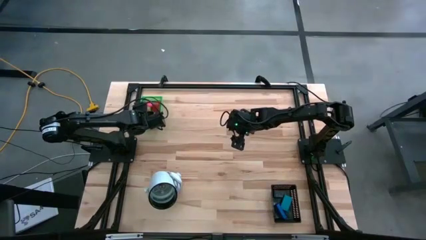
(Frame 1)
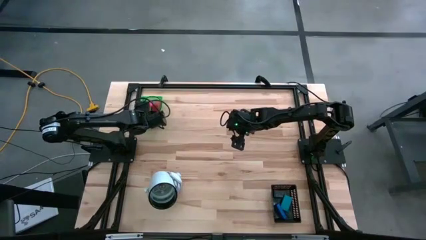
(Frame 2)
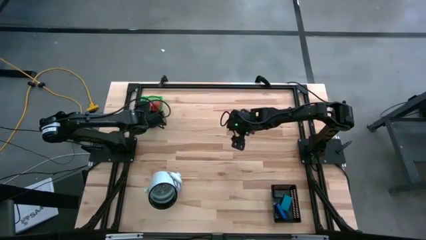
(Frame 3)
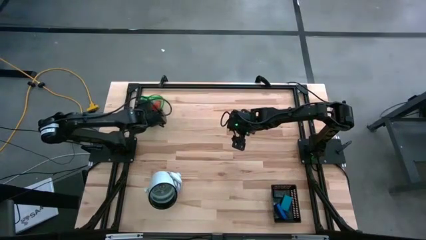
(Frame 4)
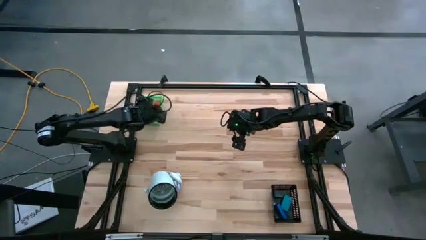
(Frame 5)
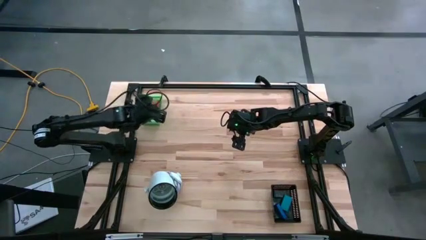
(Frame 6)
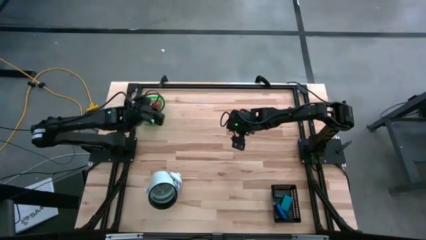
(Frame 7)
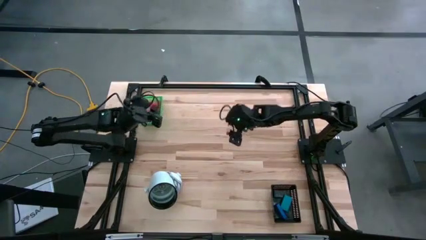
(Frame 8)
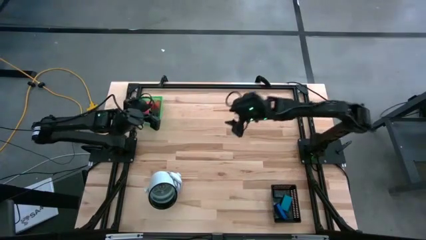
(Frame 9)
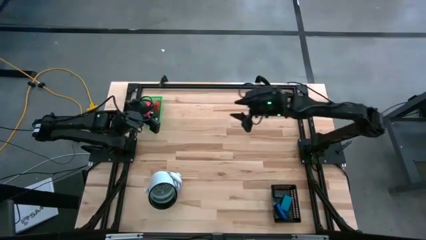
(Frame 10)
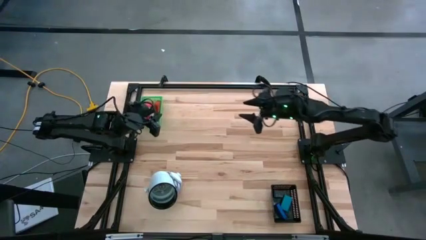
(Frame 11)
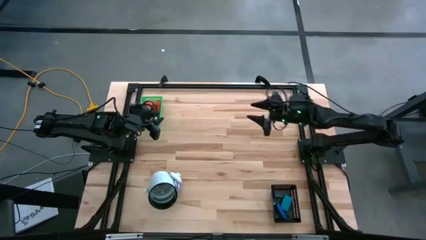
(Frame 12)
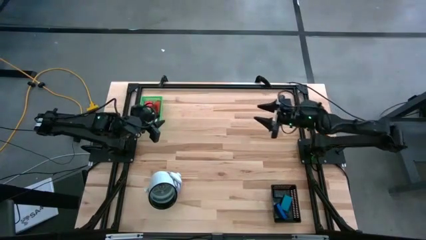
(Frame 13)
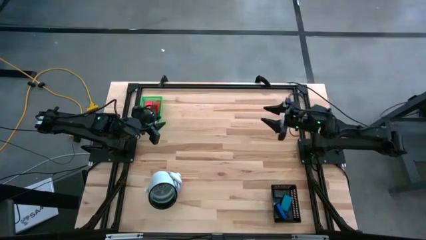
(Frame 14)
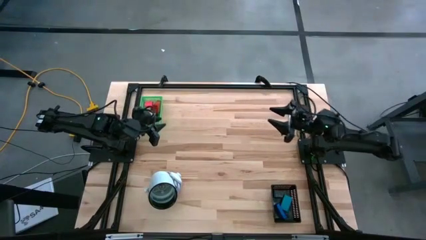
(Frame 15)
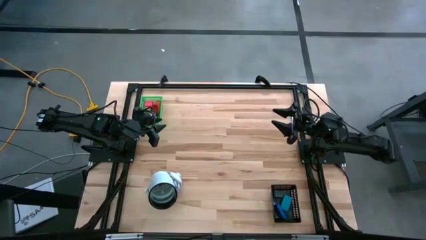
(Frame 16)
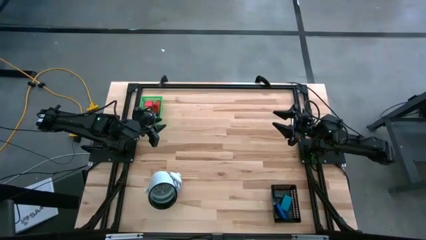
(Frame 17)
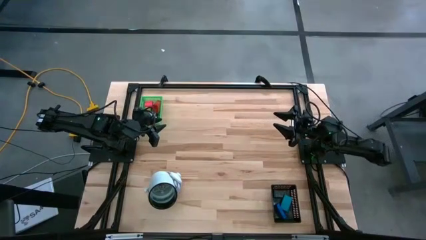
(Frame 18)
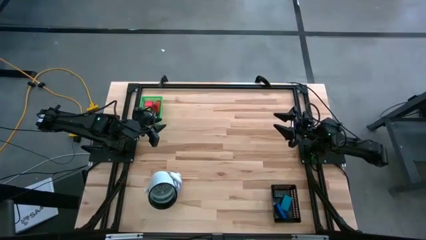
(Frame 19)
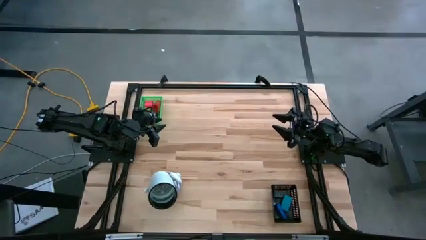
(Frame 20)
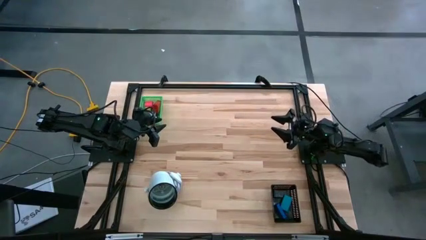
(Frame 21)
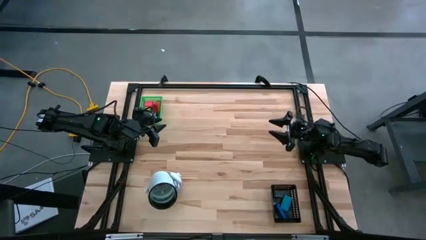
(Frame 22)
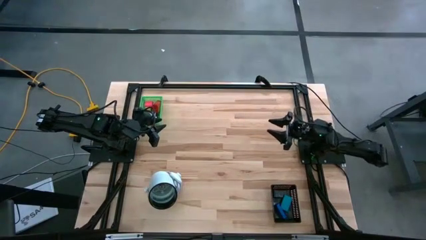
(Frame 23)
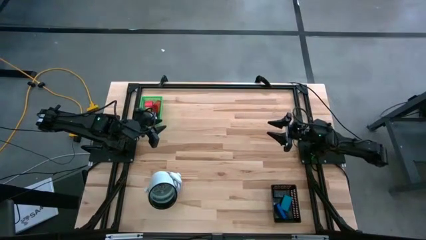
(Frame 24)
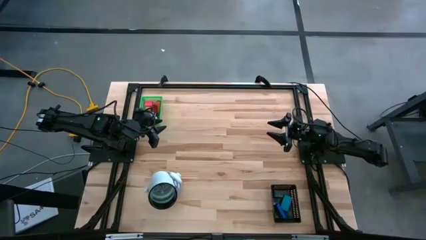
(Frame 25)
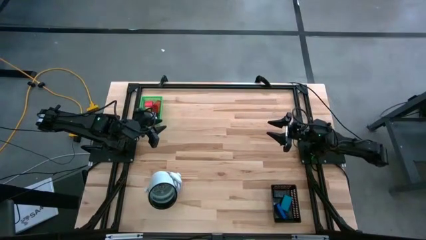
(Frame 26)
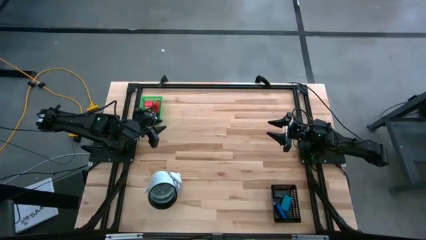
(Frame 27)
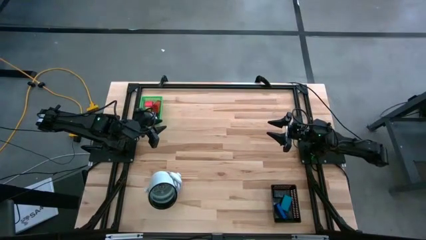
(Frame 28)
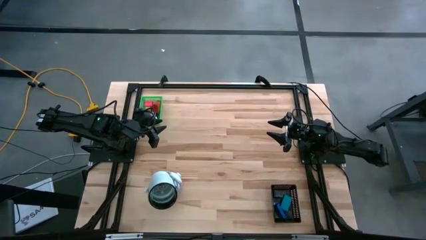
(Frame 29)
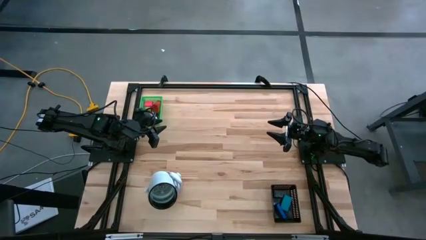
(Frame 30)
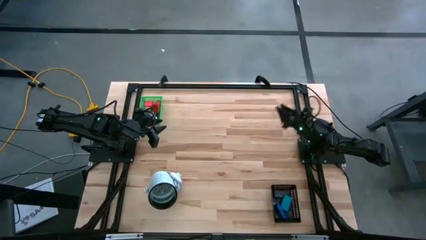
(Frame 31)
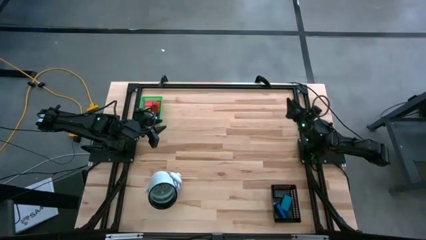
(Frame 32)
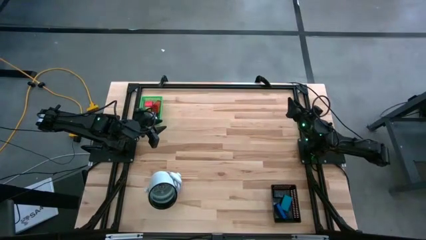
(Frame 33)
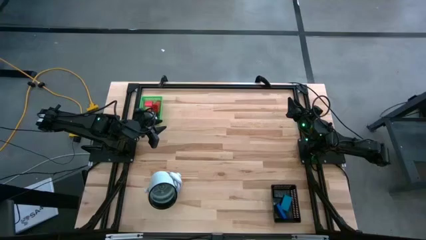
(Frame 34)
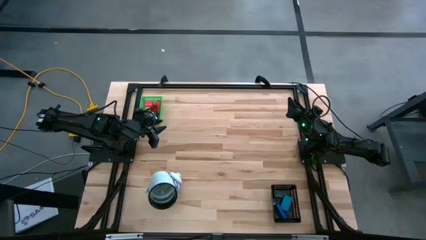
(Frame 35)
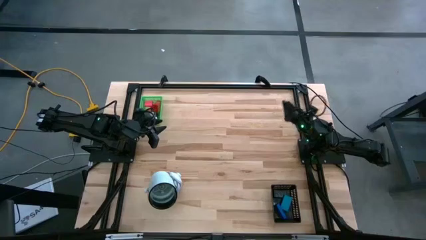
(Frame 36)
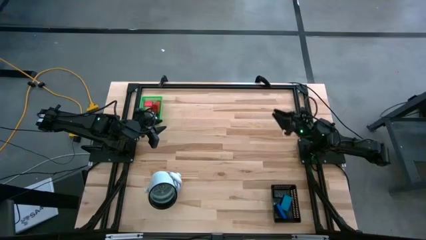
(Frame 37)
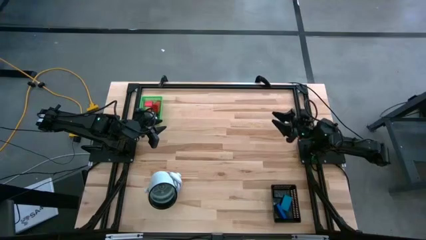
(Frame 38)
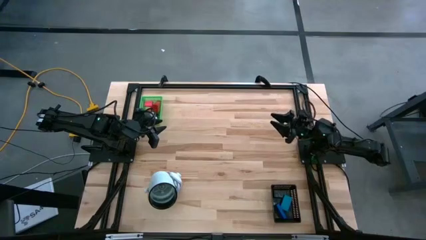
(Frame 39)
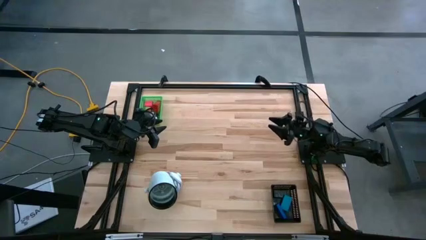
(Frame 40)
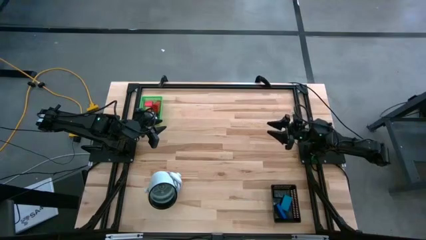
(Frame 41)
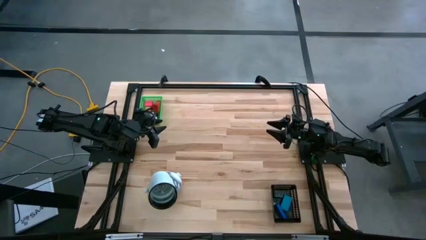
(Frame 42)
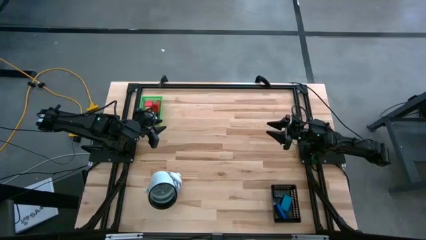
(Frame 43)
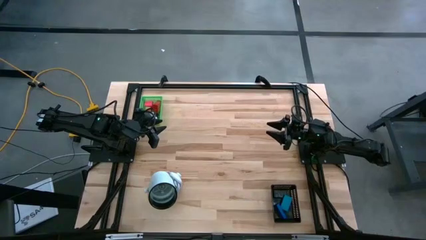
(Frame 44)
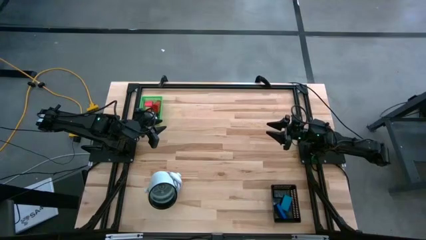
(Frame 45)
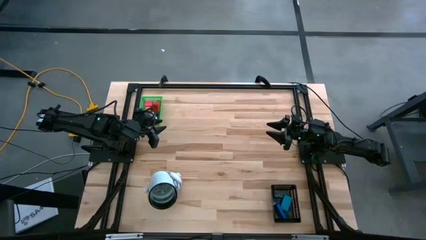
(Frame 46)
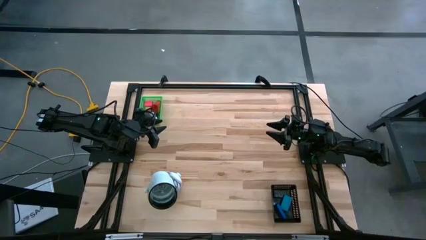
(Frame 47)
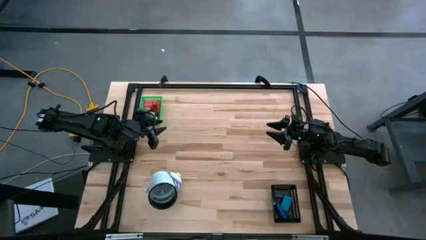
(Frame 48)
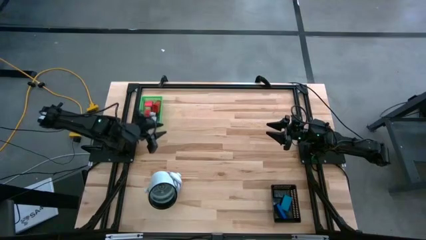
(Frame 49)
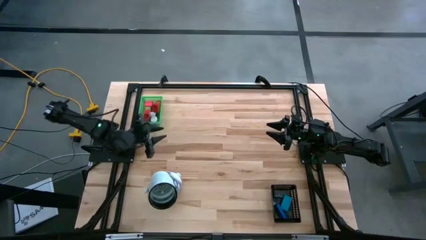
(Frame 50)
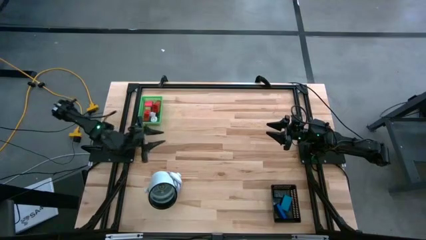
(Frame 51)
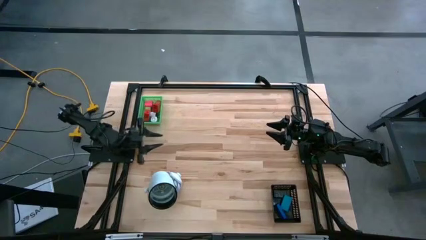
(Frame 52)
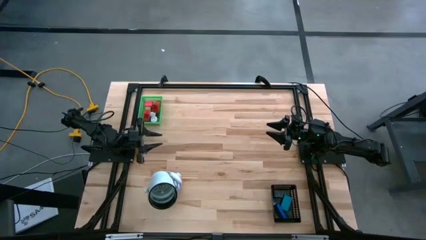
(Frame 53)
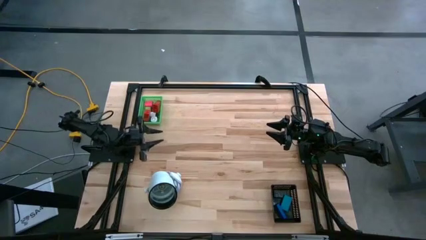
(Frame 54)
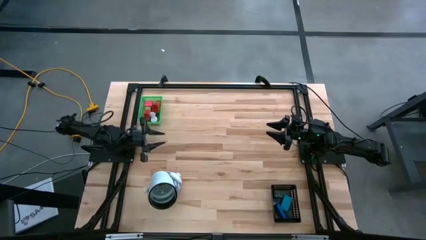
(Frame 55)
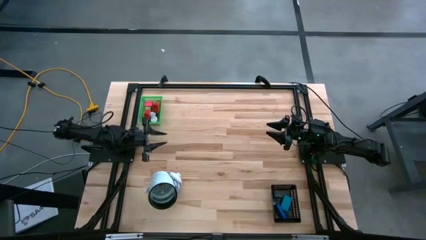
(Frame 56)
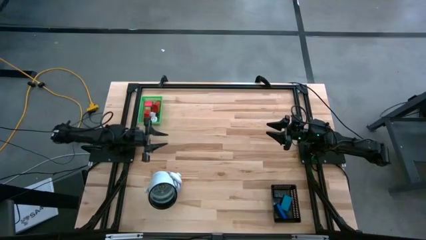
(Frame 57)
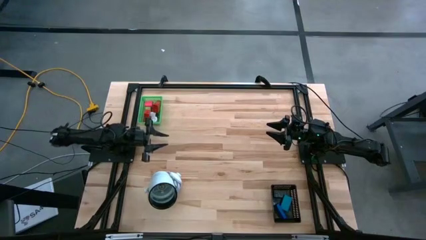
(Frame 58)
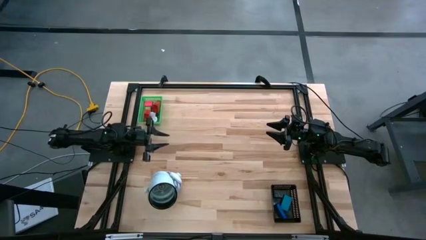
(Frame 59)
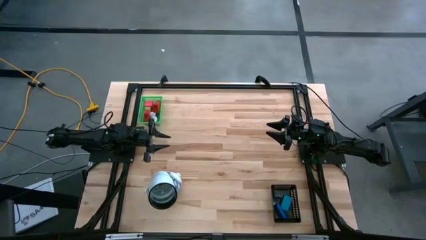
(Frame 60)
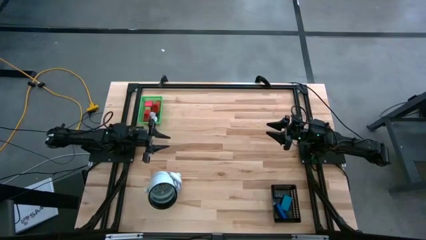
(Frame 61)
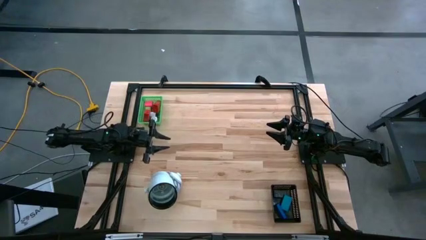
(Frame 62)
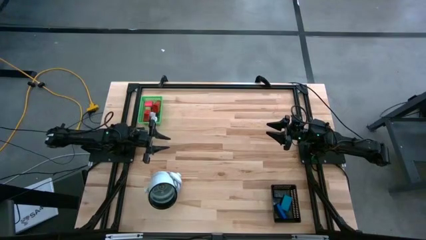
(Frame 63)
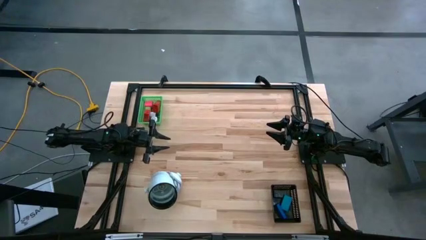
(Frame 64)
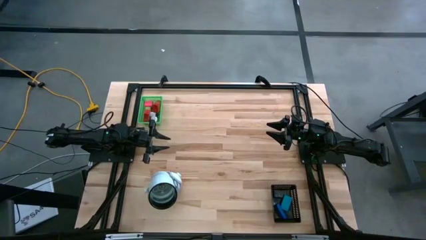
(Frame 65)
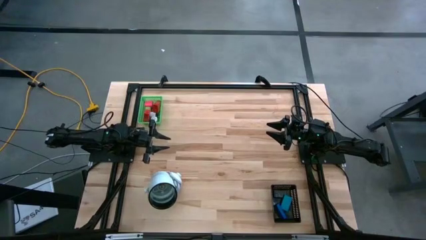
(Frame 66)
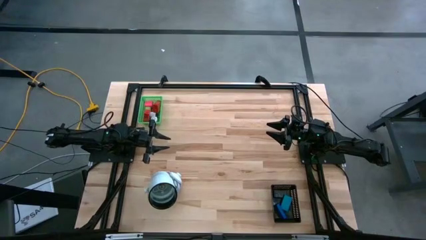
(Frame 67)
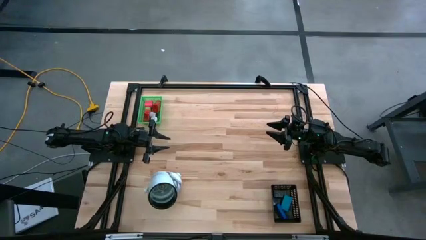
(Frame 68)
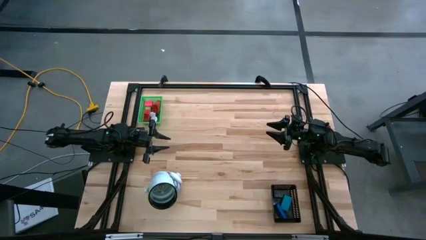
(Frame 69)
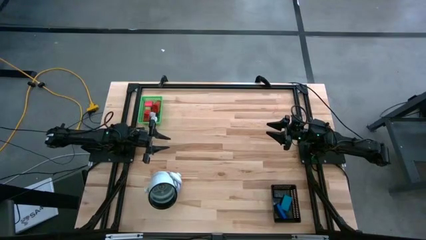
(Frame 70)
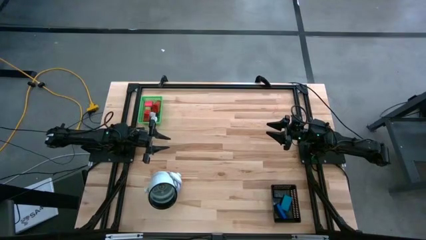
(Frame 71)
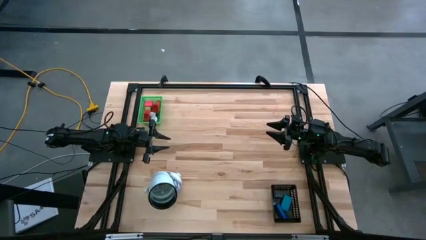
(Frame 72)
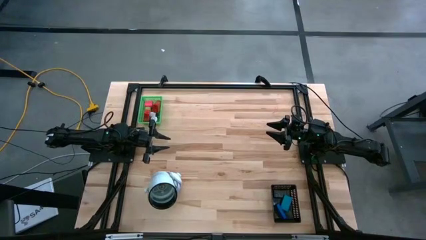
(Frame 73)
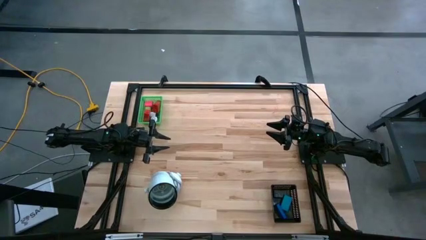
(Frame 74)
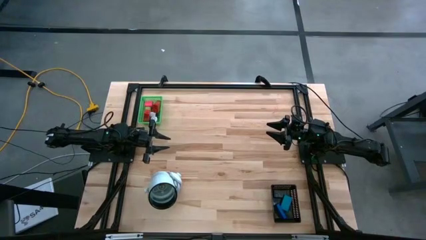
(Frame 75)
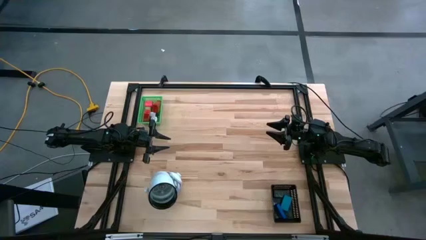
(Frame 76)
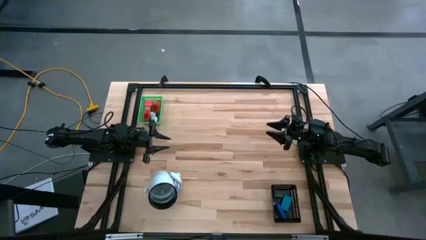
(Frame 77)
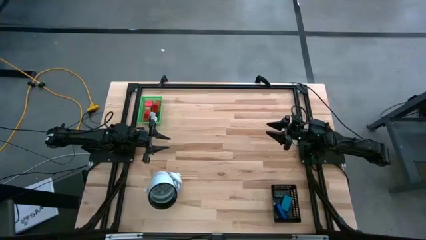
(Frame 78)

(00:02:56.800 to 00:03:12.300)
Task: Pick & Place Office items
Return to Home Position
